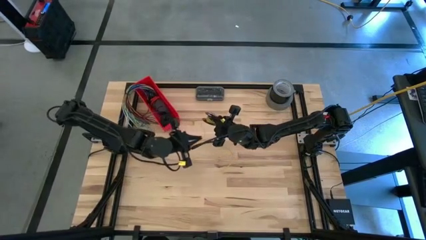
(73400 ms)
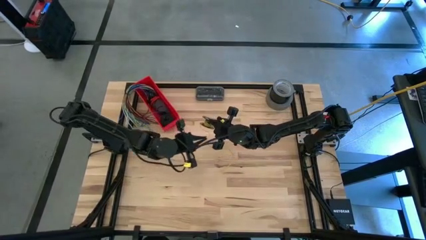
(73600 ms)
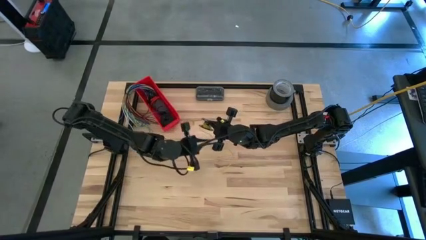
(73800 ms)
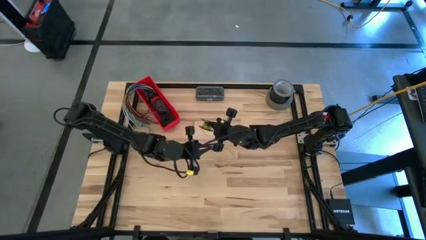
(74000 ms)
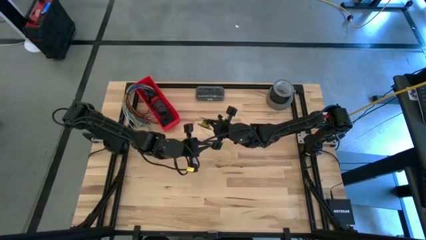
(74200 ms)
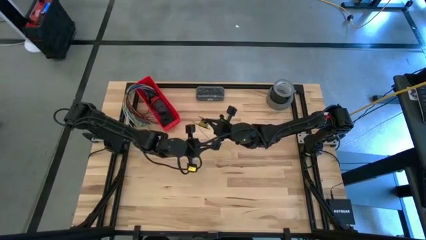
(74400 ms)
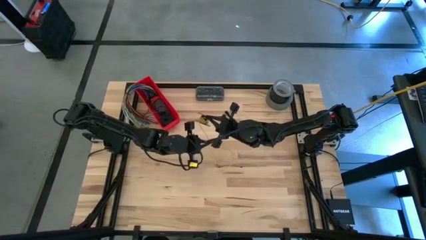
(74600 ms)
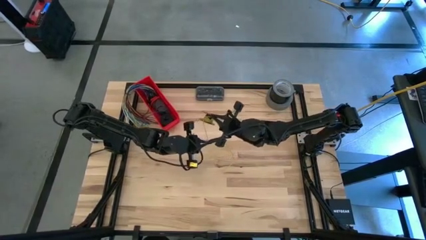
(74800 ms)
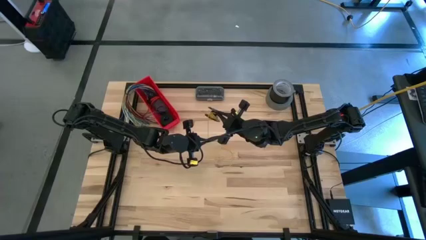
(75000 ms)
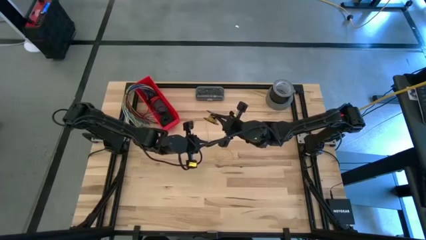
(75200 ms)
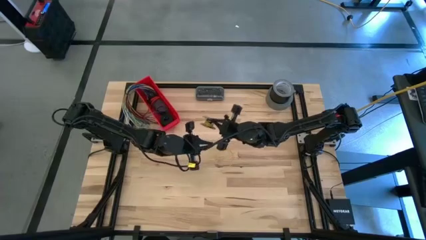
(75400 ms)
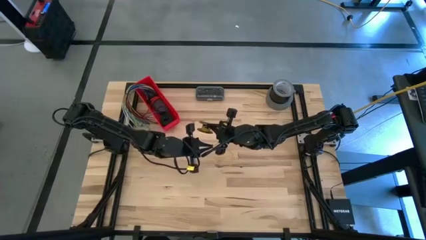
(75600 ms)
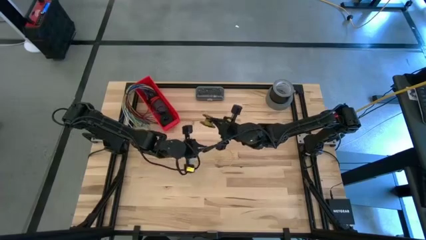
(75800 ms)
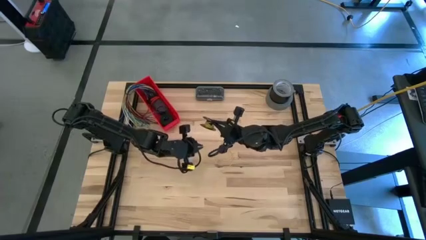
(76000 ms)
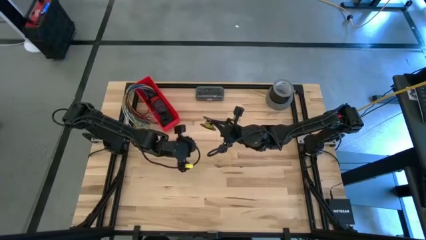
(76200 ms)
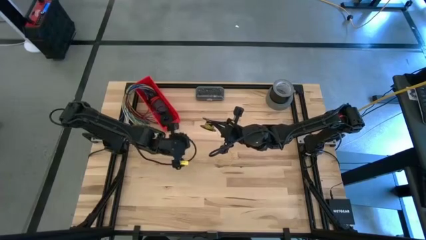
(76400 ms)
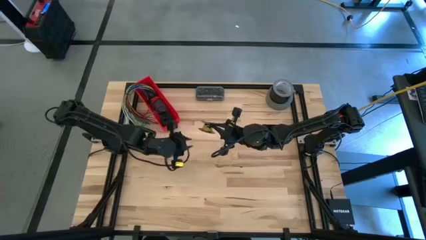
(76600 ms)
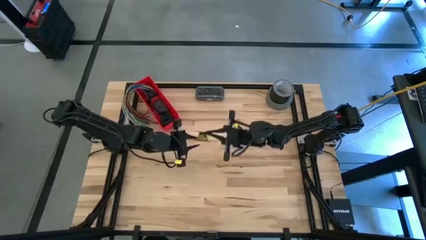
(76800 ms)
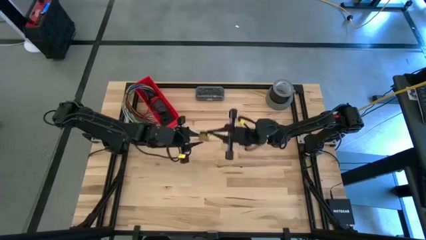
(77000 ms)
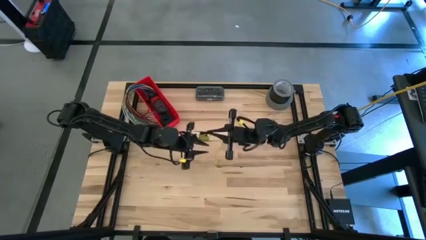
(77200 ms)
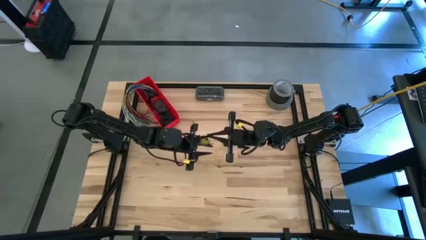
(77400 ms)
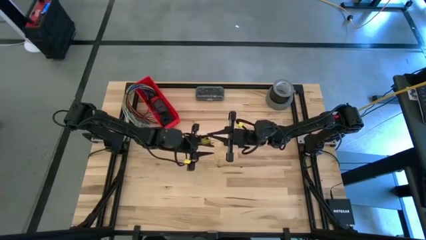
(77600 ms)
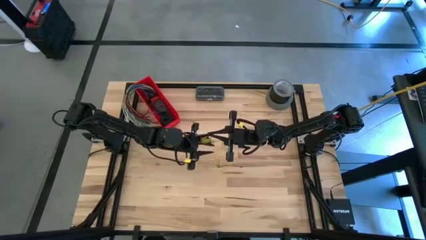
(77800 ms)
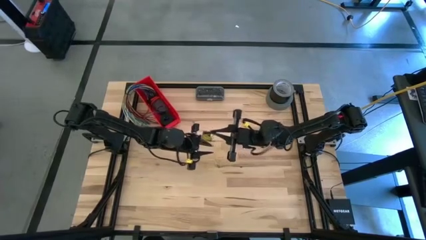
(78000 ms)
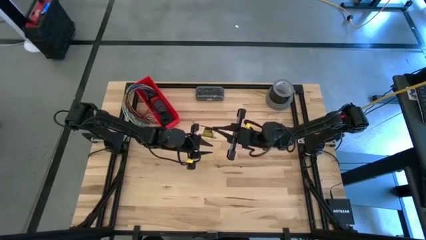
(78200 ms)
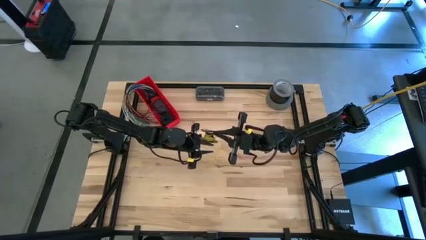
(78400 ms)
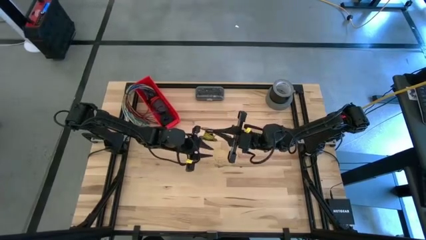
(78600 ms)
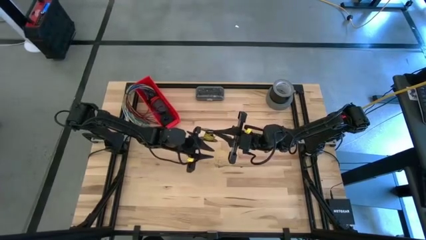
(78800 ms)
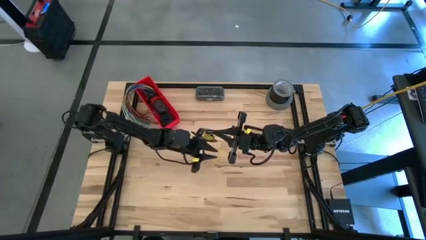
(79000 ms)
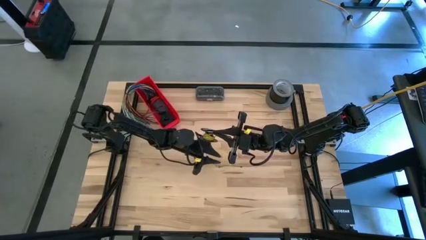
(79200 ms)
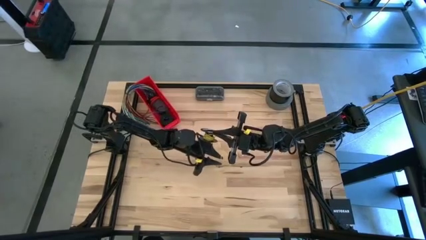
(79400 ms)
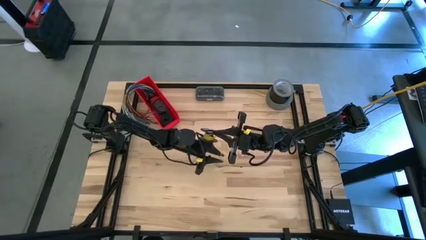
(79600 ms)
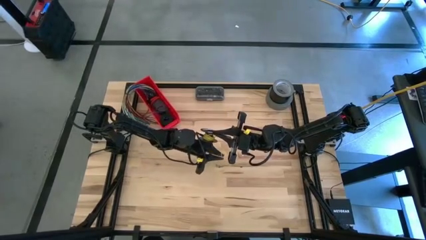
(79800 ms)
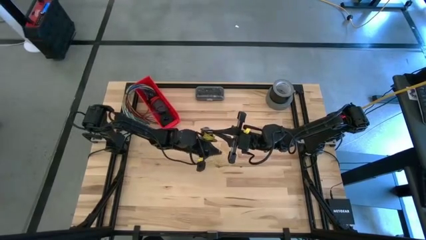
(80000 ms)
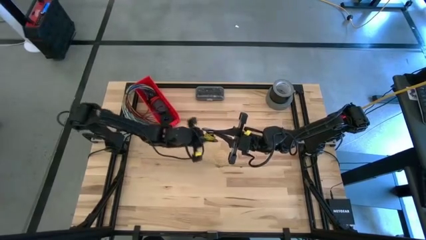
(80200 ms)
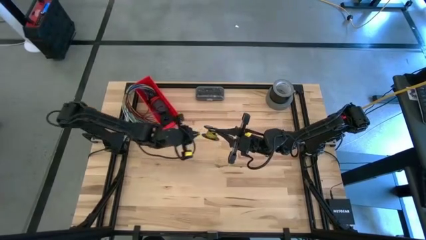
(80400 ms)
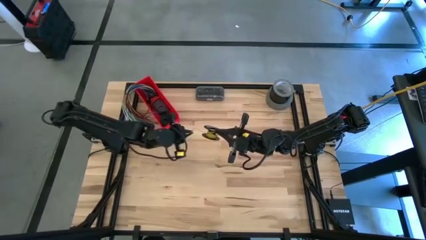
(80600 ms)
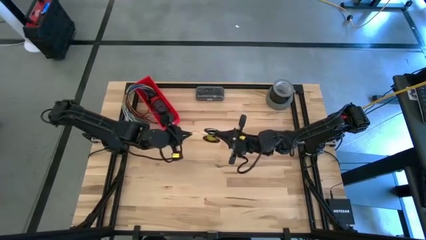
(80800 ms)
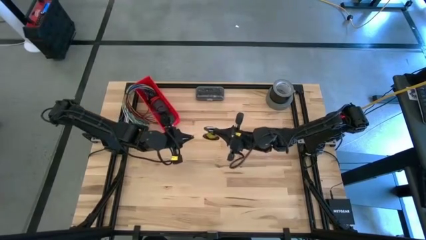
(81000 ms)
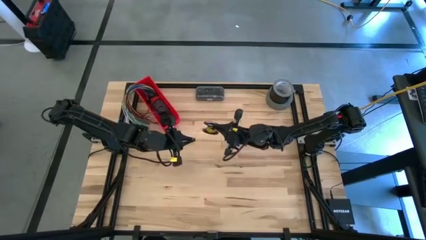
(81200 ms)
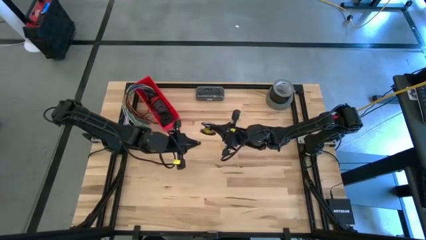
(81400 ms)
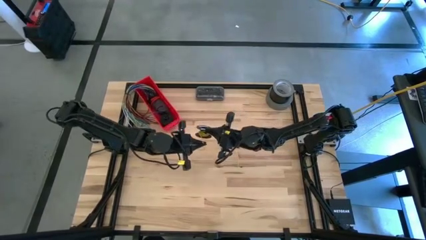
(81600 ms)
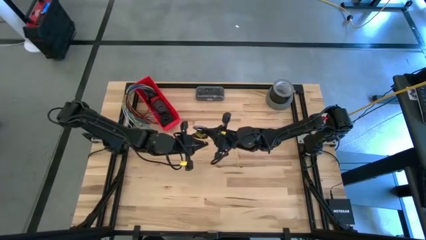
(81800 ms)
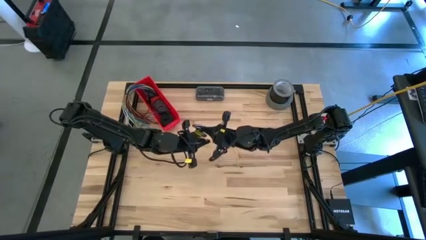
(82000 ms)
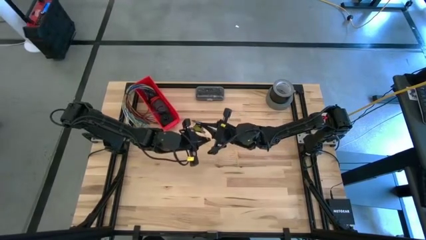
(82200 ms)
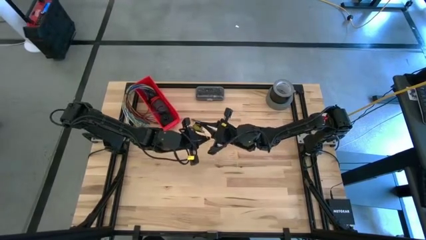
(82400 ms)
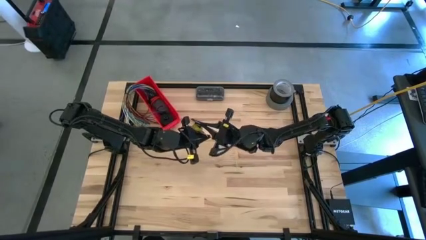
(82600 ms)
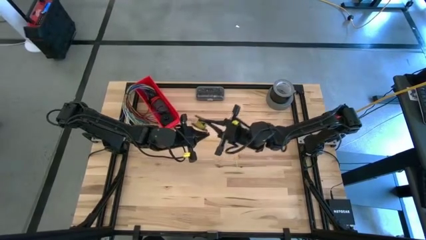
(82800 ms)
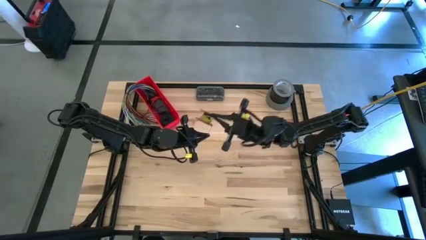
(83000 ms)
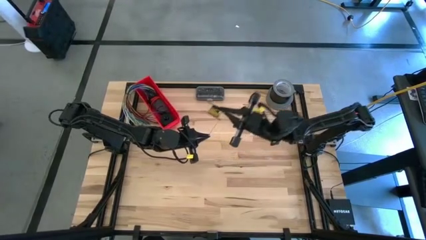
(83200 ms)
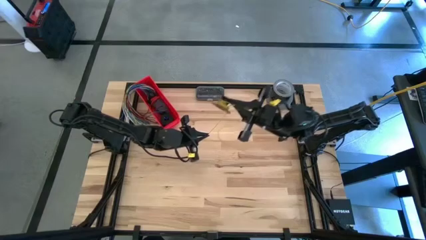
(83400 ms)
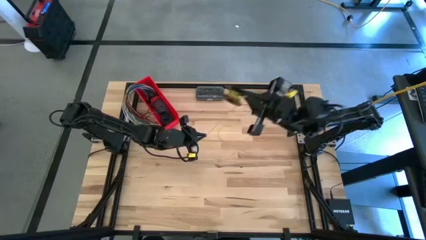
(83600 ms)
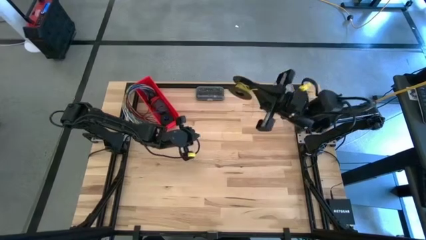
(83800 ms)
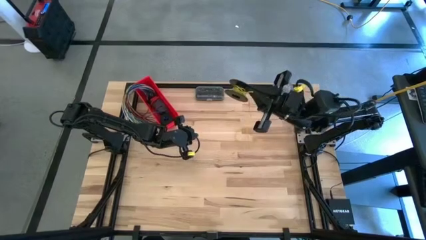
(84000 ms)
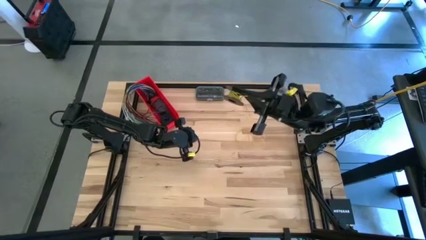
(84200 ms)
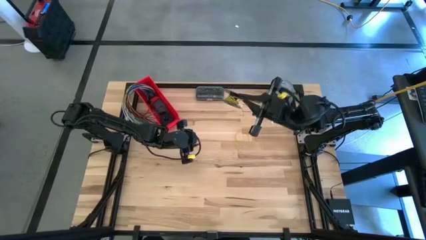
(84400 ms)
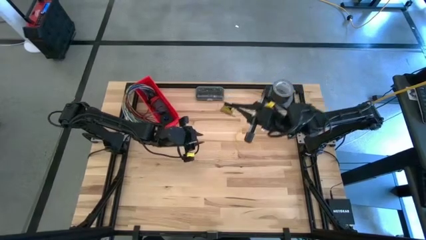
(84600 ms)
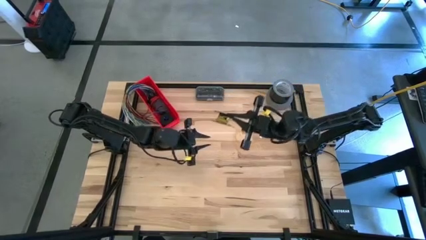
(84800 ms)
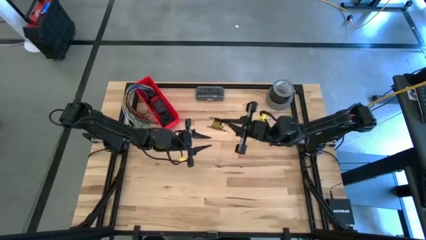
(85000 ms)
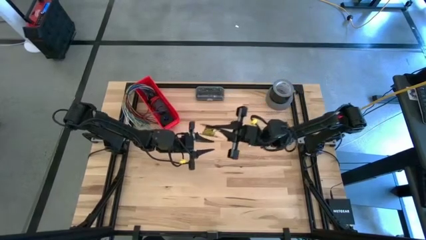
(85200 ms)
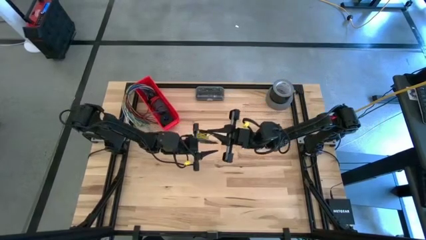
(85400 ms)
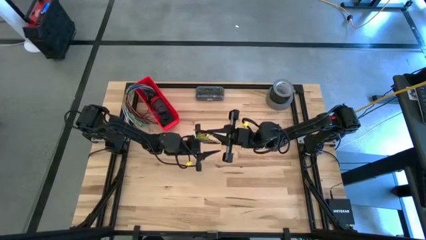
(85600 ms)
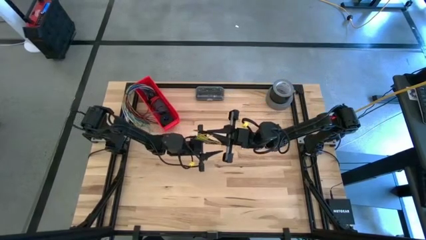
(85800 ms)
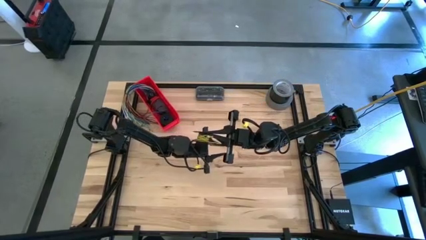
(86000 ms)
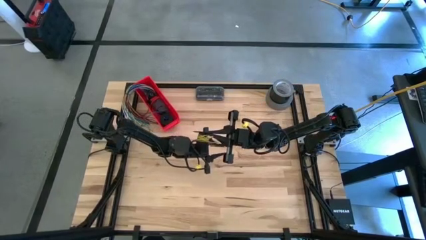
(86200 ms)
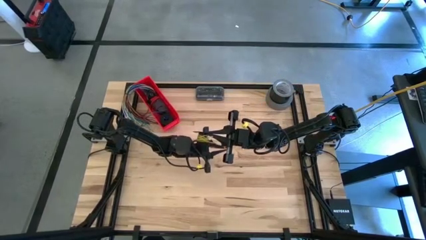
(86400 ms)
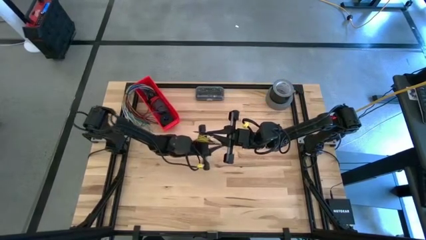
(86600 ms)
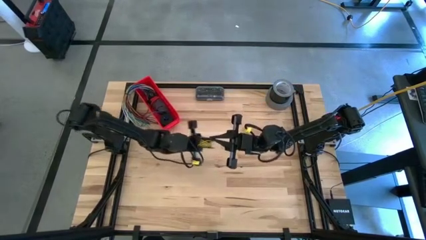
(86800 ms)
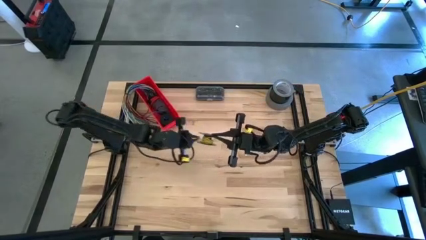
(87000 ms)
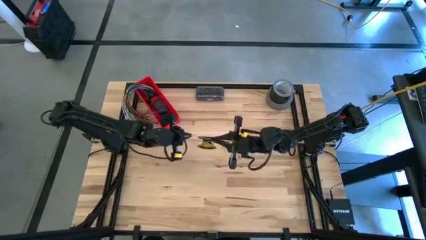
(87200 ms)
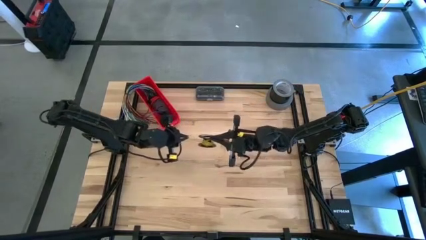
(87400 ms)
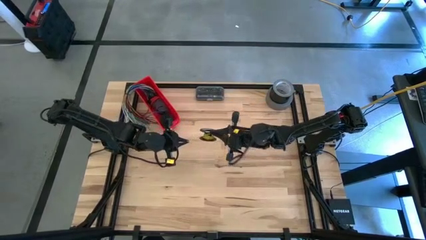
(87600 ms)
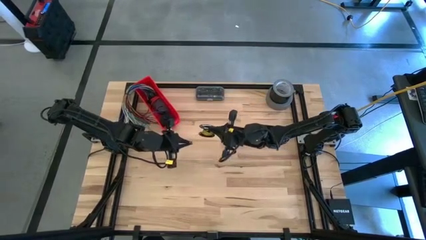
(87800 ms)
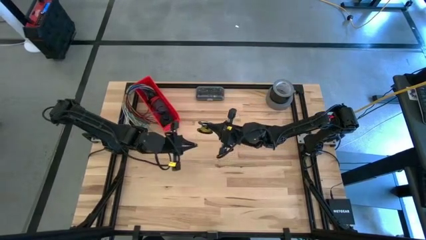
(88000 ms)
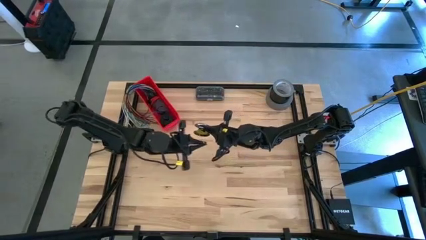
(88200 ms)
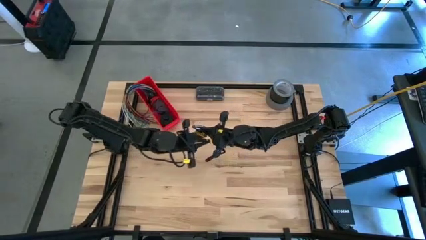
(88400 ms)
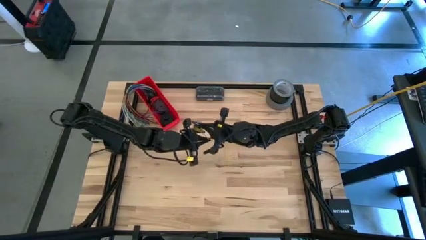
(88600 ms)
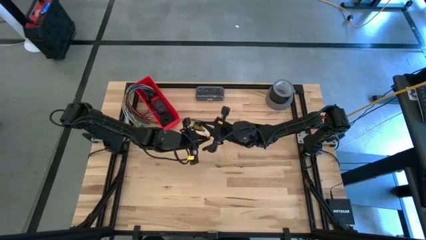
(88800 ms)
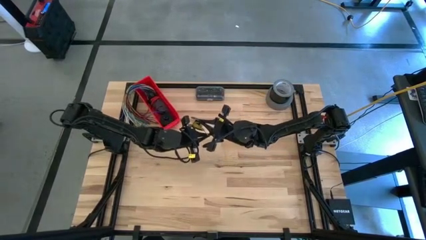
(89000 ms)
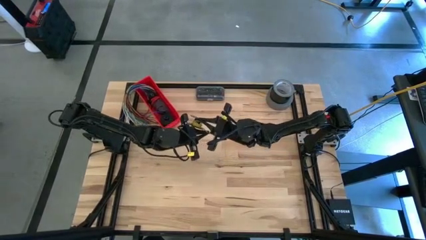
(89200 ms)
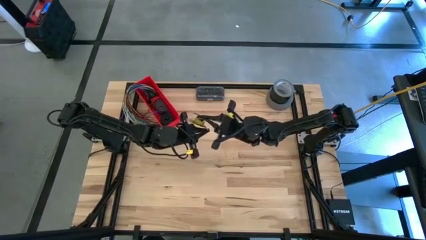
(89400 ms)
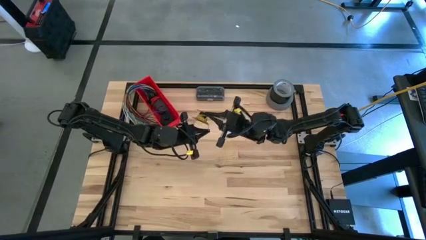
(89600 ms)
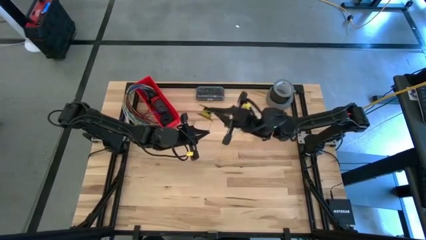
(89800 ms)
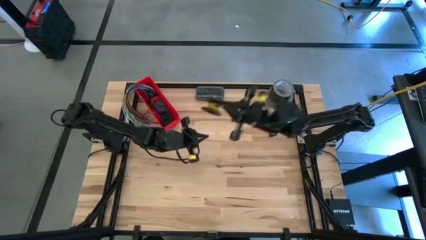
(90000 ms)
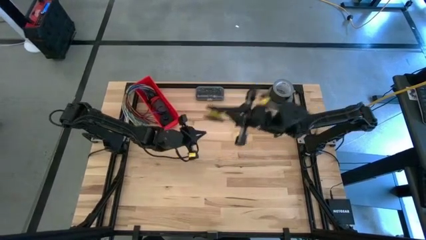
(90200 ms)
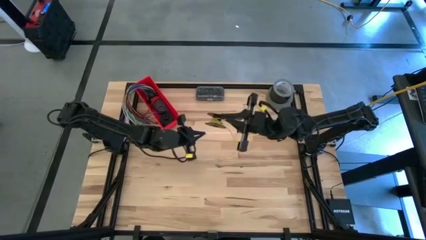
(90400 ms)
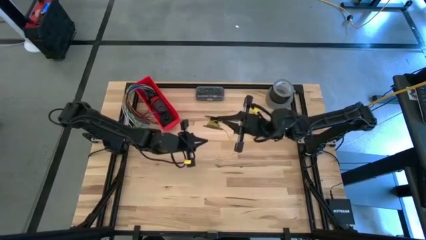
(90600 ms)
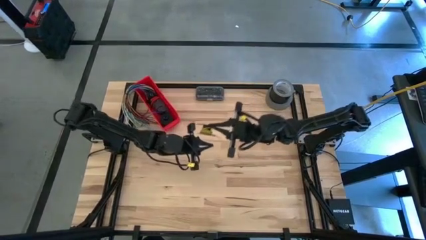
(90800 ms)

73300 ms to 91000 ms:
Task: Coil cords
Coil the yellow wire on the spool
